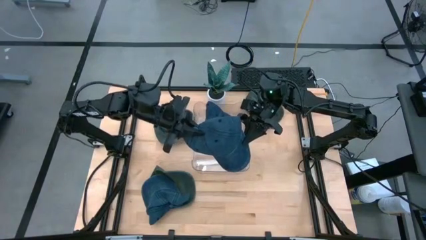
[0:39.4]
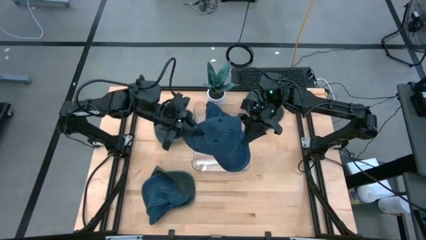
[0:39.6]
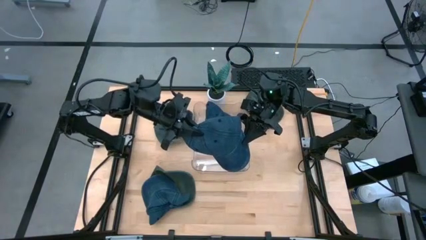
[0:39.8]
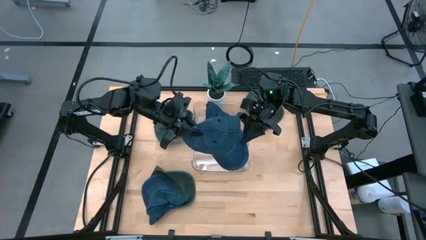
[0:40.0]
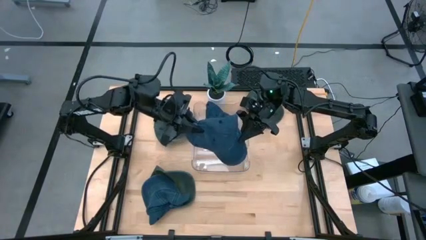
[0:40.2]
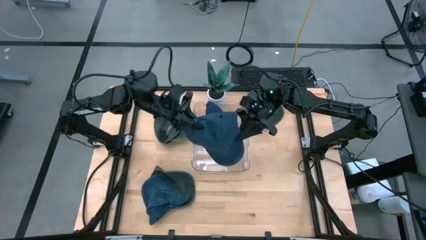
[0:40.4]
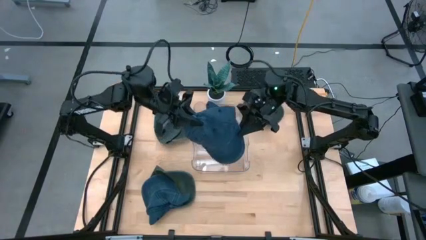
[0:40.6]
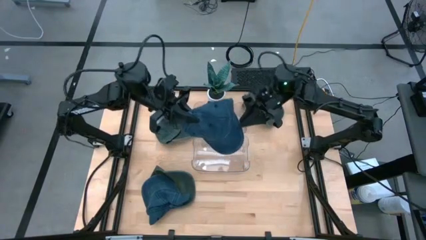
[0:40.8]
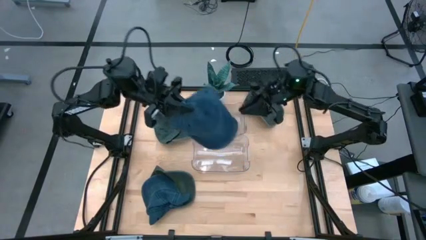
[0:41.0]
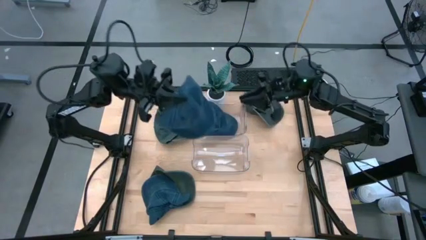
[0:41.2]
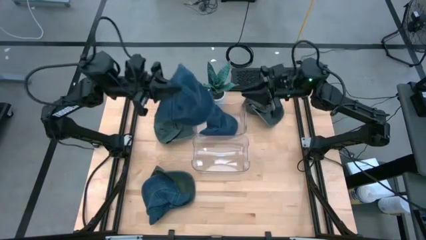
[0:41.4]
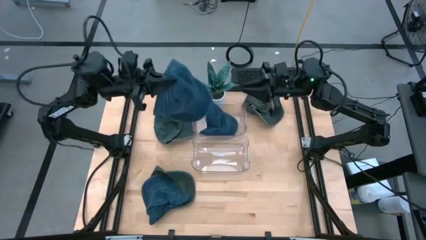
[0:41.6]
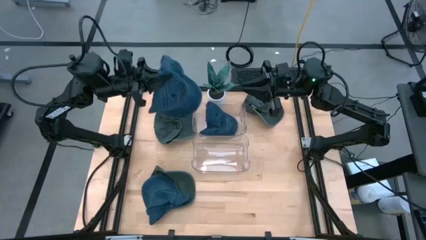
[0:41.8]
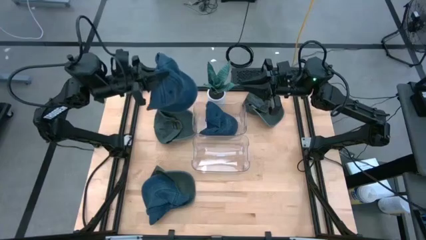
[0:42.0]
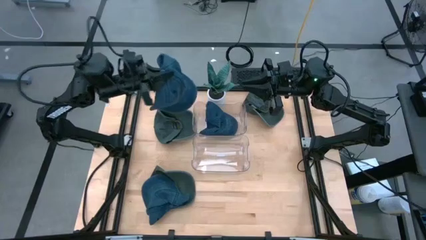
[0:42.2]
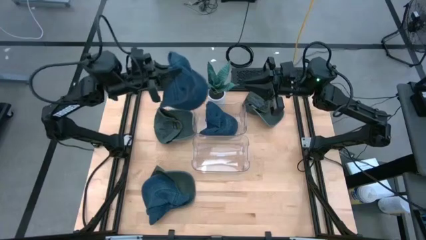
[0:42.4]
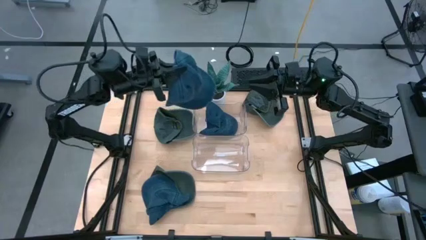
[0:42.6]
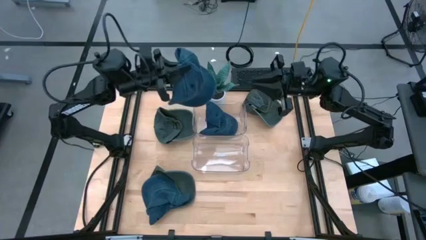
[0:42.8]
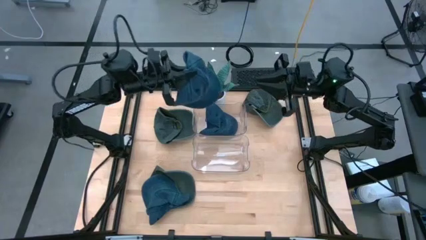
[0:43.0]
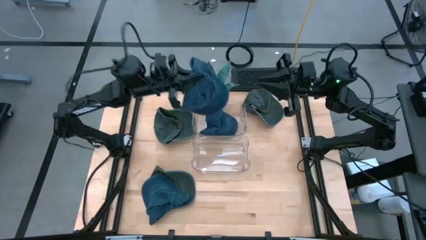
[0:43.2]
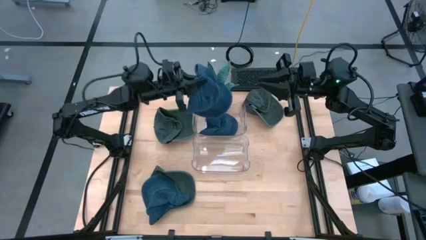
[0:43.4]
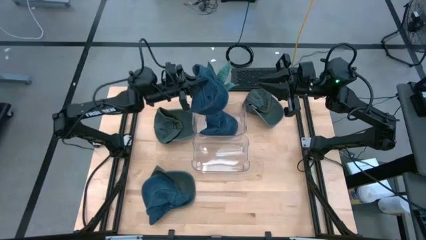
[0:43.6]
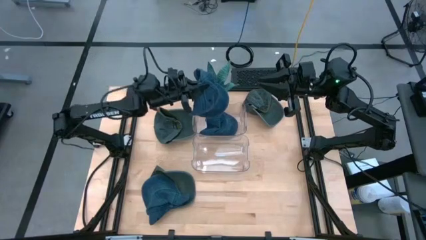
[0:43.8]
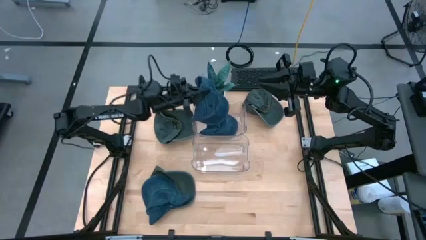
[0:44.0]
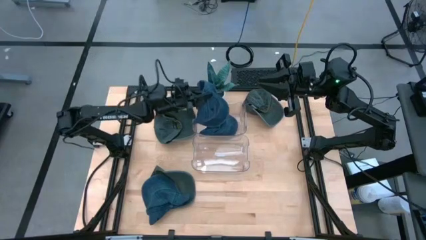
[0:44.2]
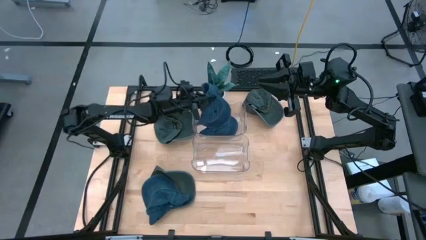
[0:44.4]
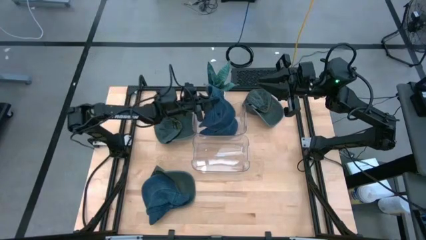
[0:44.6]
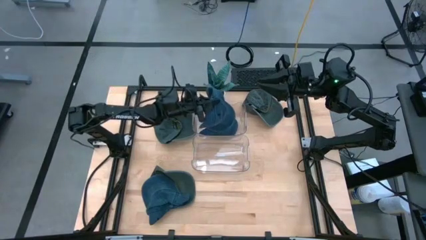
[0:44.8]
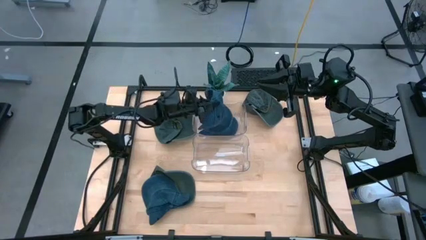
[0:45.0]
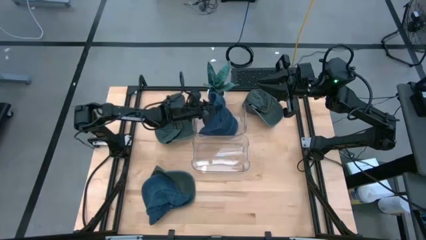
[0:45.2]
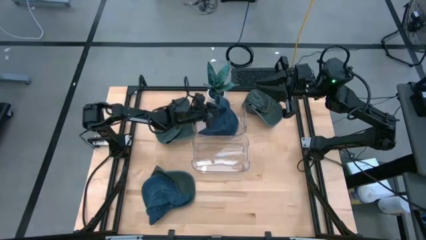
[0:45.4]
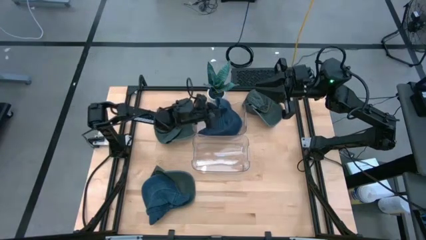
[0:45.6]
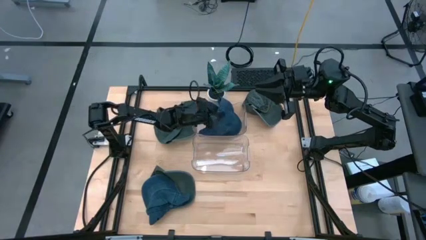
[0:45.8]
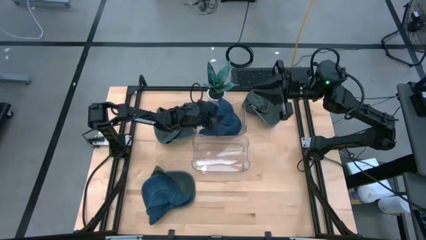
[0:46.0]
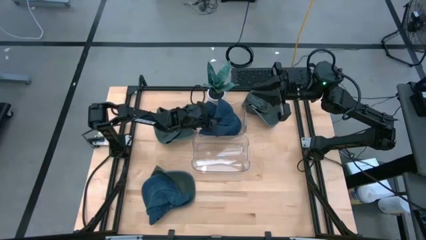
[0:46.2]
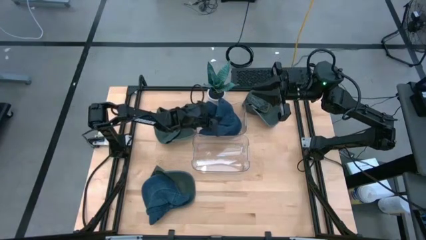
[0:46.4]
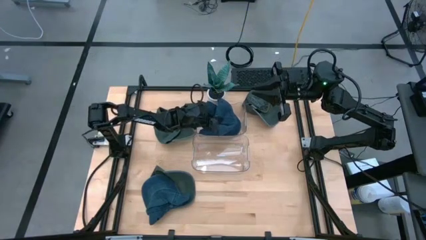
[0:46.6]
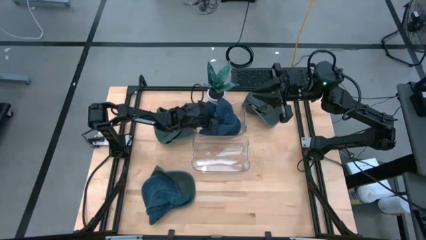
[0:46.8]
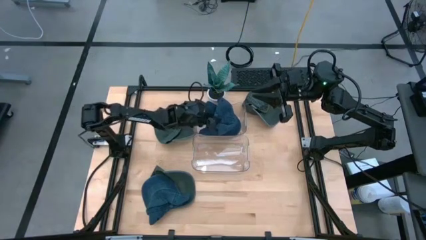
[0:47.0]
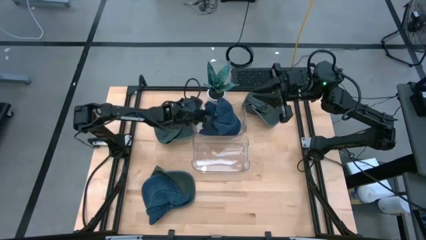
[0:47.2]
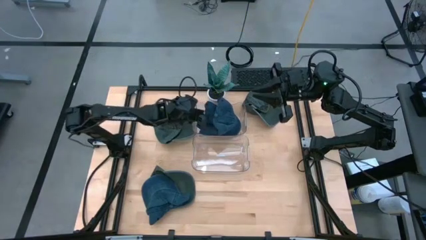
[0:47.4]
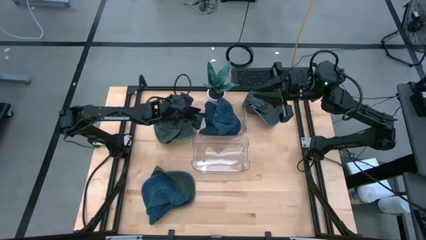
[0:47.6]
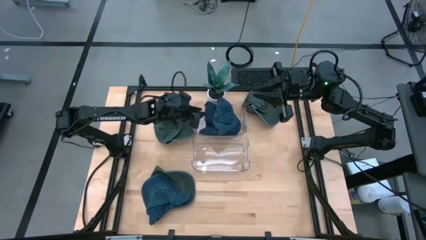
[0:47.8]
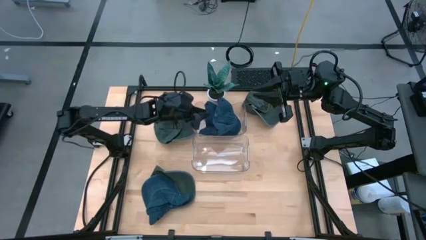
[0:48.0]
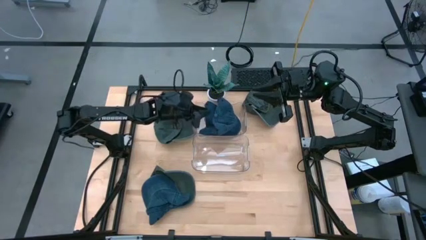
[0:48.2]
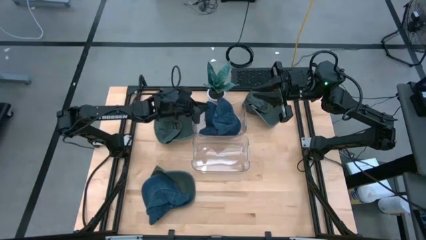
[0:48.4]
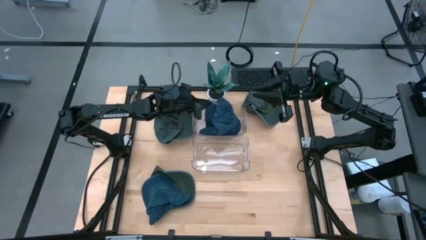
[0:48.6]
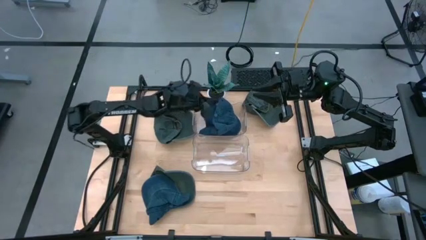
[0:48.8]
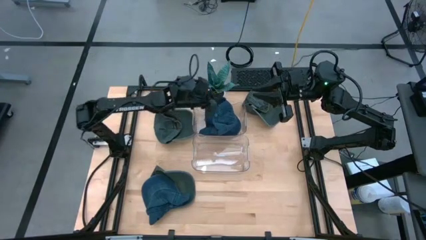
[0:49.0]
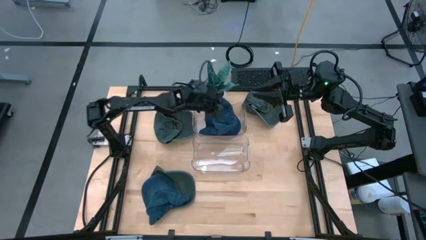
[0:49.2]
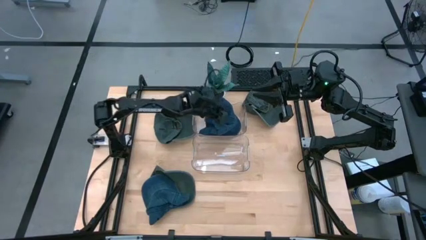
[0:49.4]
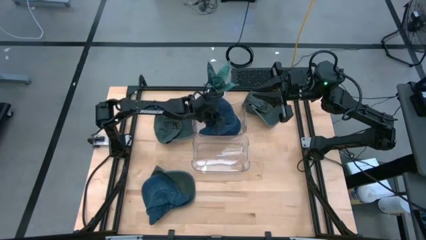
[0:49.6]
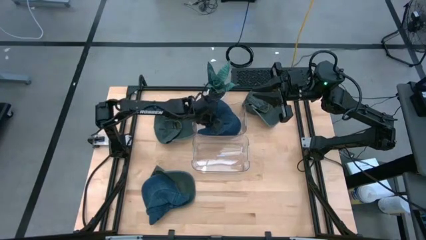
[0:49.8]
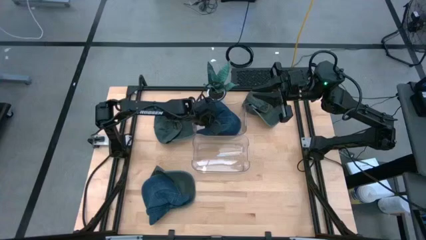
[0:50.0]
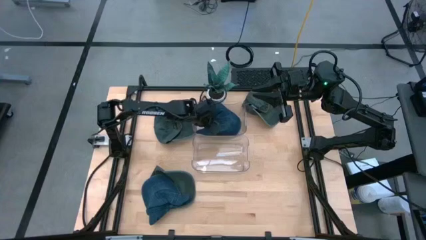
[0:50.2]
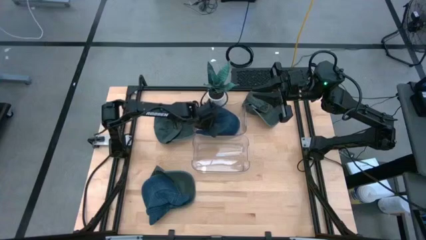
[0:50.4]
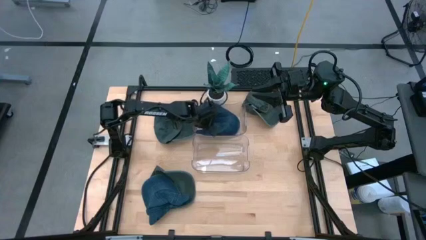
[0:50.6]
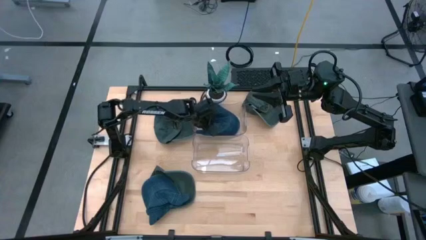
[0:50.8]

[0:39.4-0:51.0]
Task: Pick & Place hat
Put the top blue cap into the top transparent bin

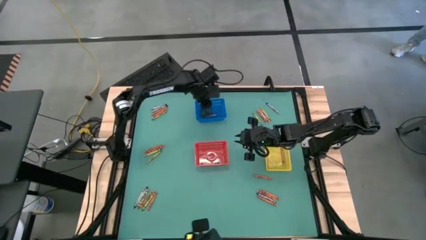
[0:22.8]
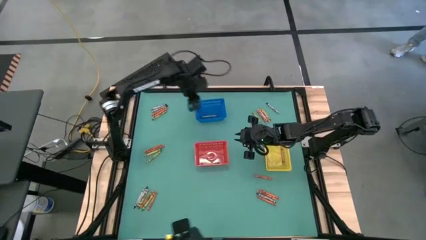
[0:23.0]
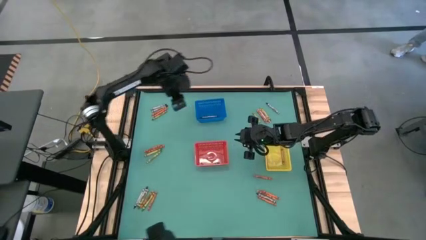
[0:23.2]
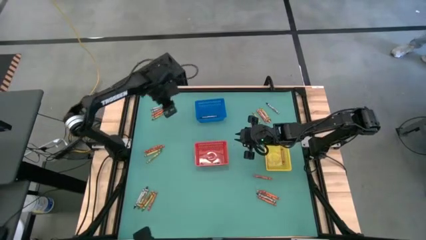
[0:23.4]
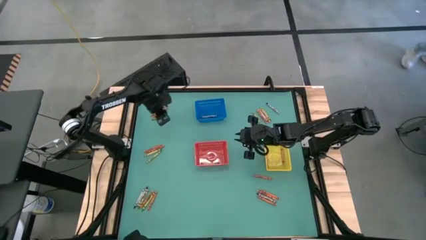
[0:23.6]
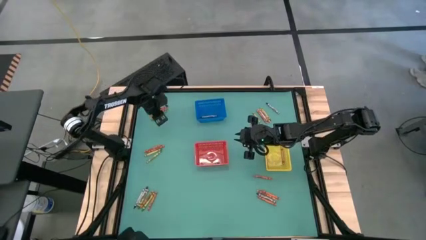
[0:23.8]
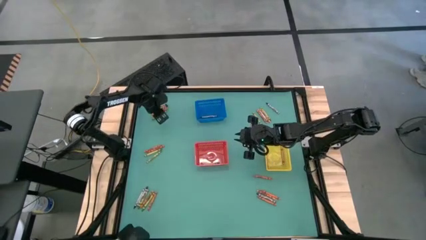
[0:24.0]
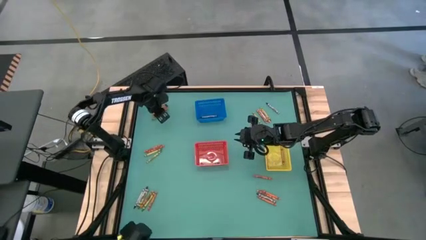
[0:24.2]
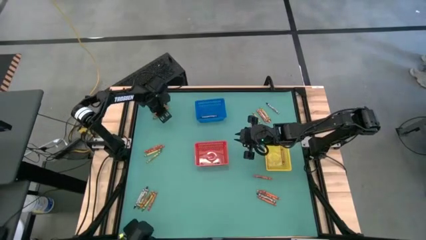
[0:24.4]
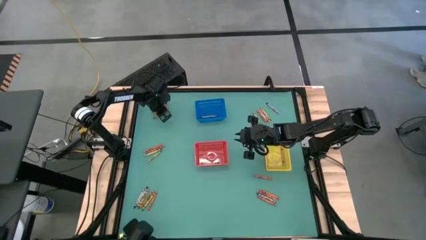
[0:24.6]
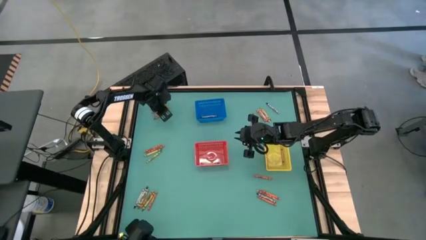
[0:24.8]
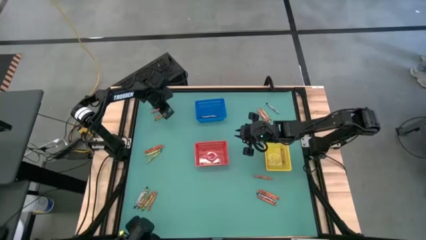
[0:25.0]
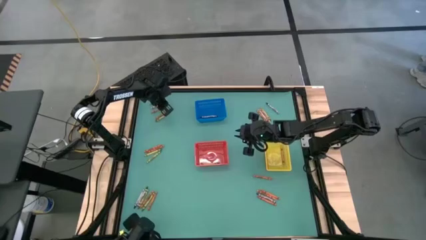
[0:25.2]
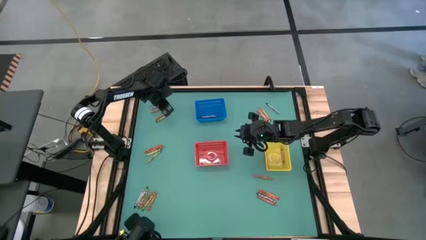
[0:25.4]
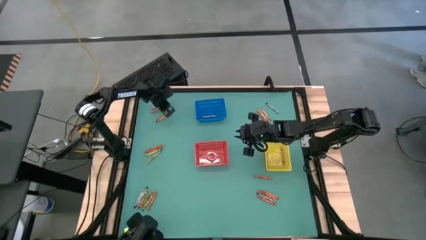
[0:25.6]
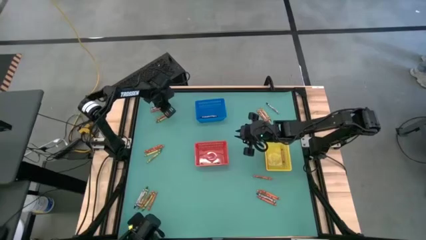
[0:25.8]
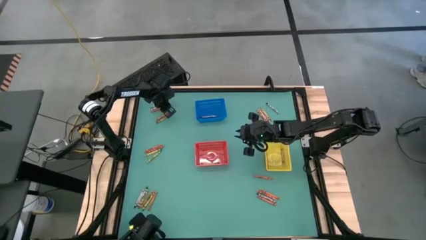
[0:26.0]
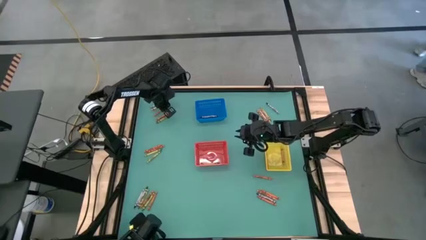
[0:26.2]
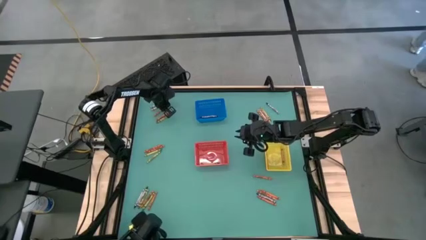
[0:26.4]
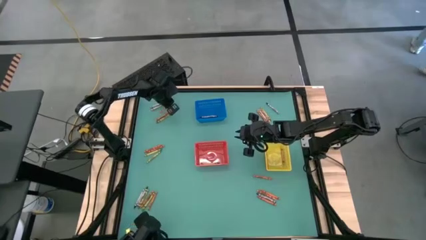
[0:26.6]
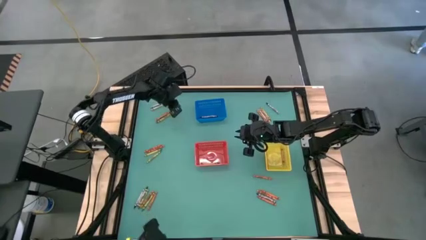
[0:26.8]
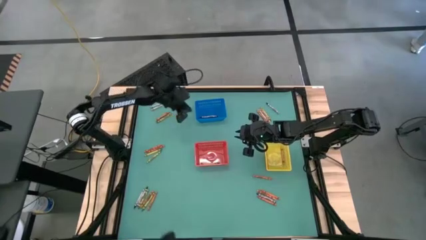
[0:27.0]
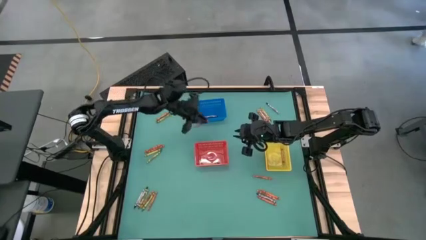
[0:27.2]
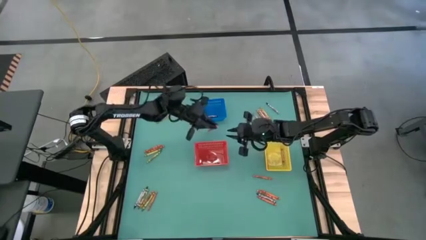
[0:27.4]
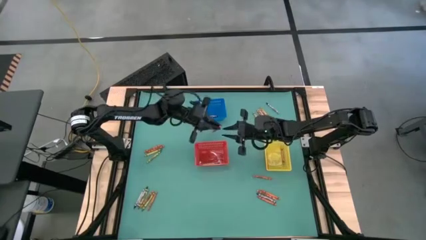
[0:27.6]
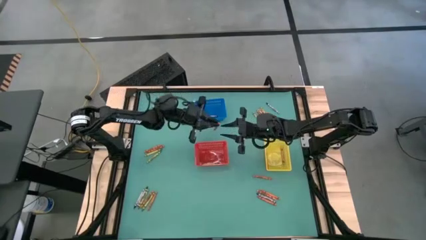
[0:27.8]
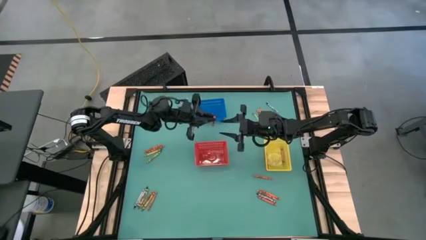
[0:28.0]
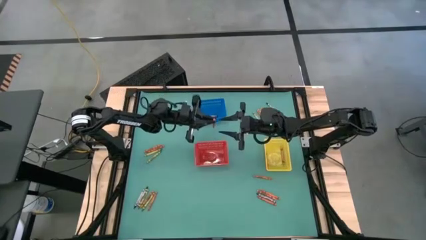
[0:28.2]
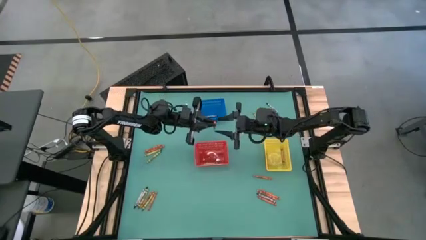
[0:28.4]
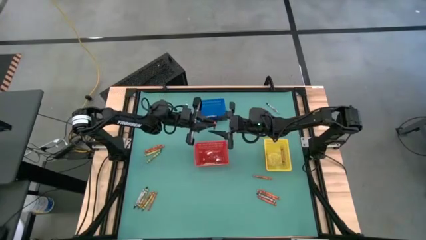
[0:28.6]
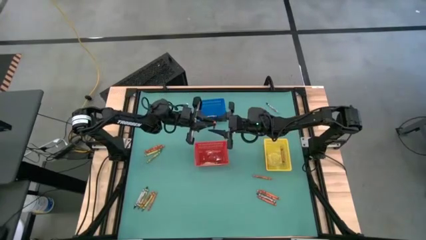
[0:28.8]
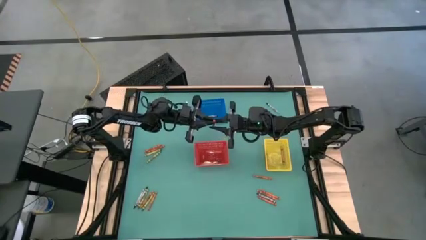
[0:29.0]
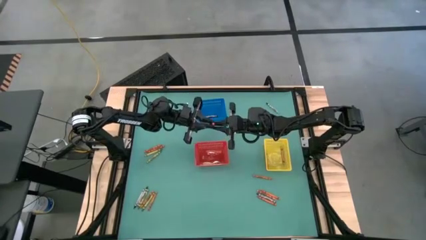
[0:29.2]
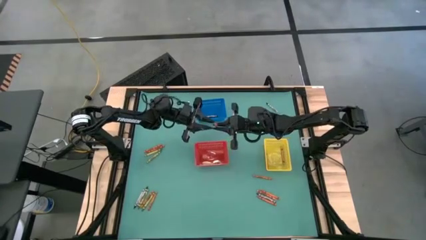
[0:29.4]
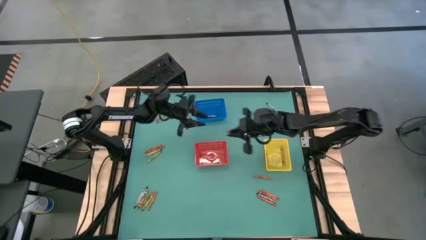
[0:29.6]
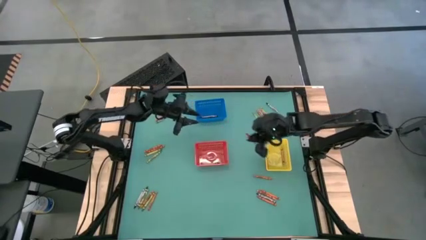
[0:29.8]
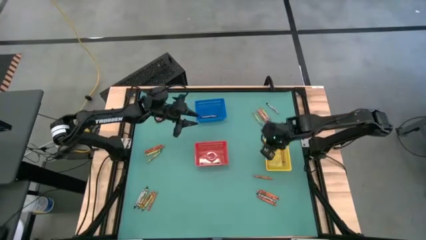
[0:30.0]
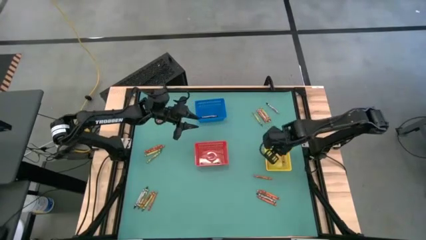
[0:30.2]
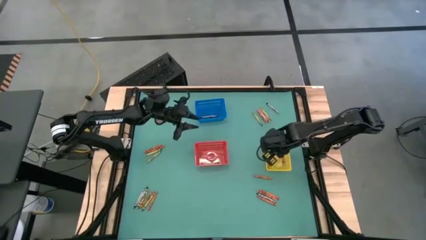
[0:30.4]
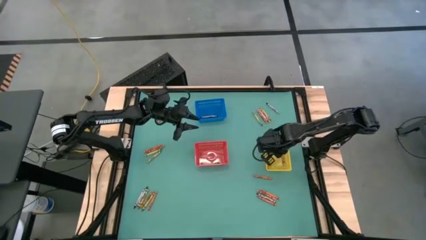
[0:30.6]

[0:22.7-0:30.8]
Task: Sort crayons
Put the orange crayon into the yellow bin
